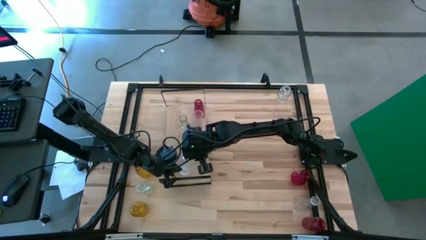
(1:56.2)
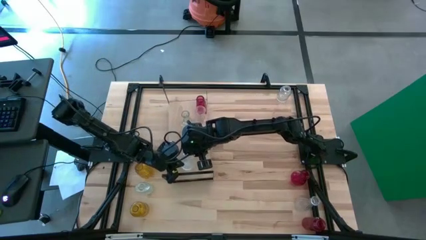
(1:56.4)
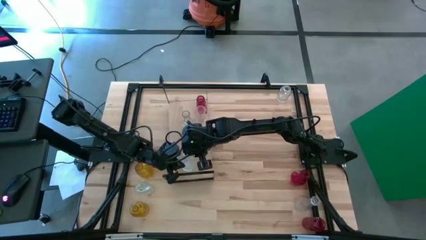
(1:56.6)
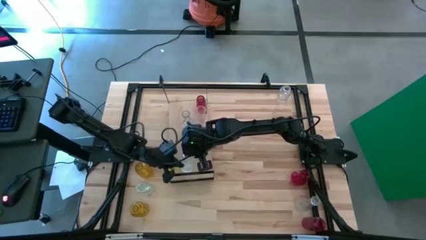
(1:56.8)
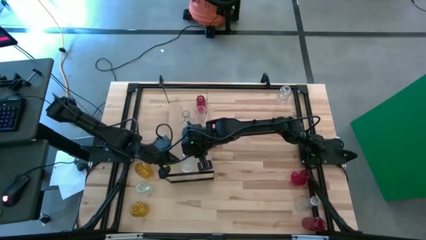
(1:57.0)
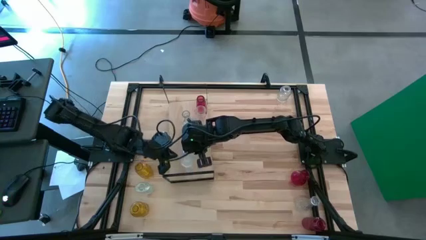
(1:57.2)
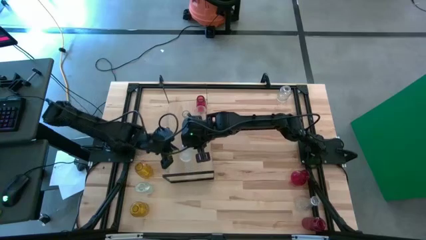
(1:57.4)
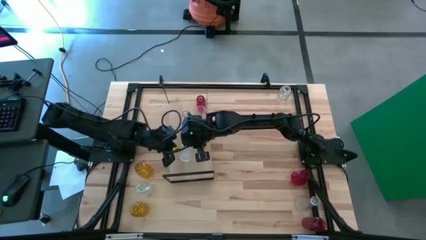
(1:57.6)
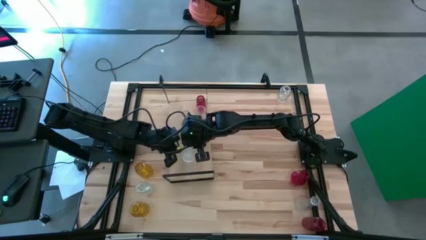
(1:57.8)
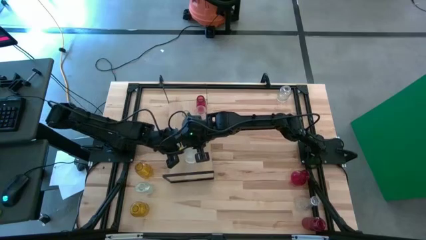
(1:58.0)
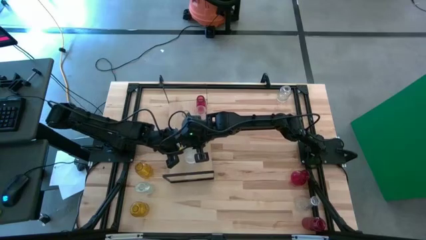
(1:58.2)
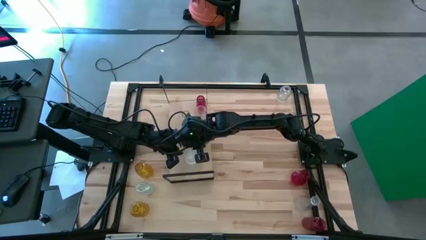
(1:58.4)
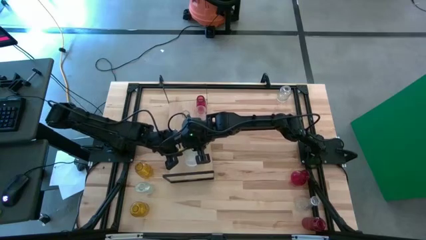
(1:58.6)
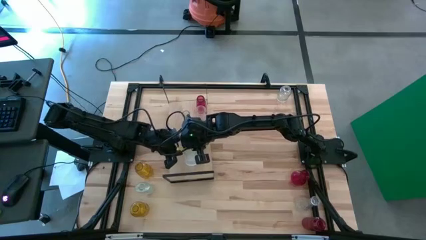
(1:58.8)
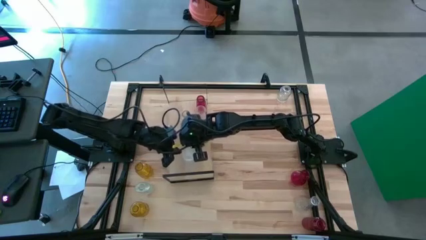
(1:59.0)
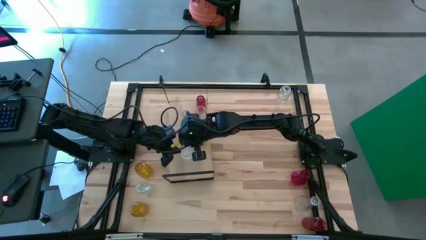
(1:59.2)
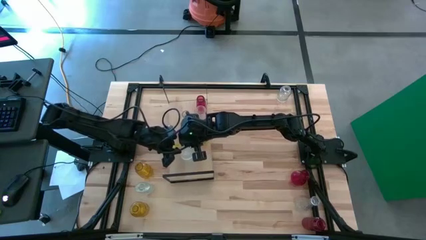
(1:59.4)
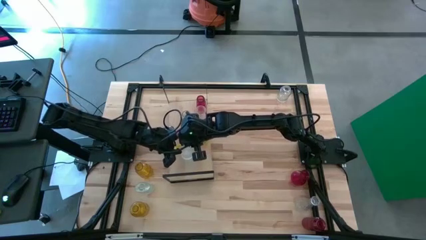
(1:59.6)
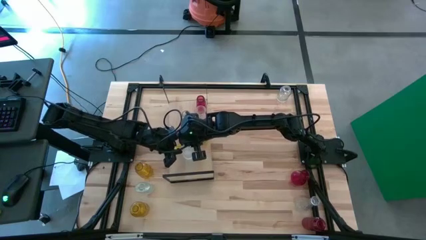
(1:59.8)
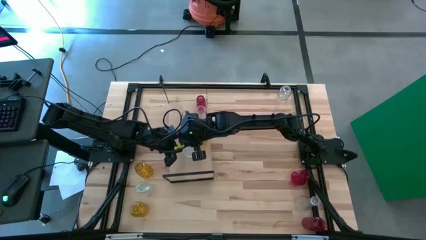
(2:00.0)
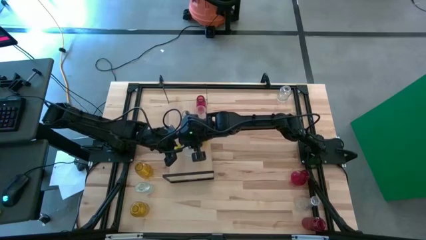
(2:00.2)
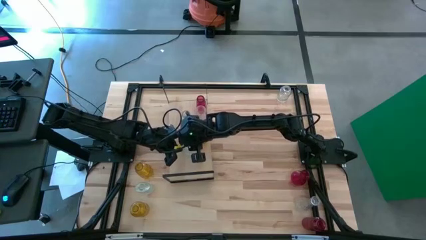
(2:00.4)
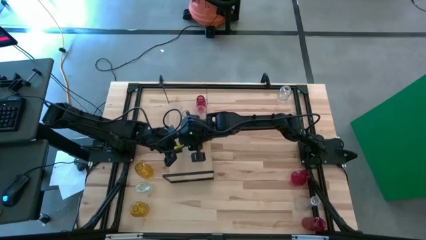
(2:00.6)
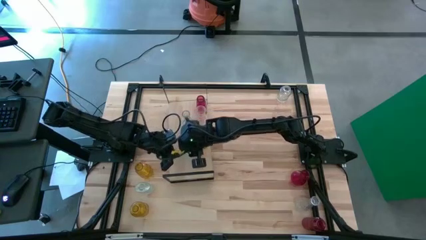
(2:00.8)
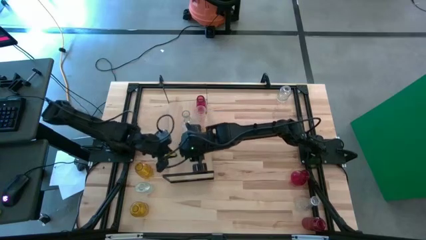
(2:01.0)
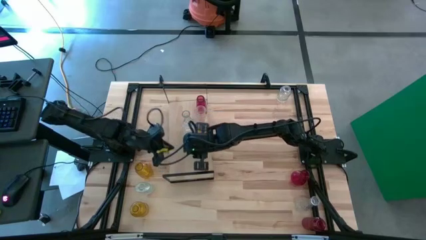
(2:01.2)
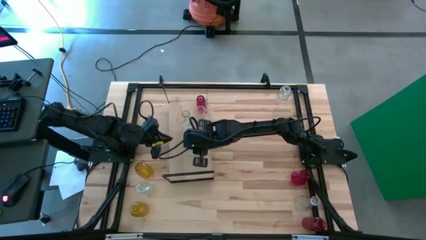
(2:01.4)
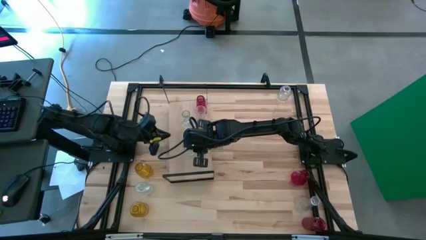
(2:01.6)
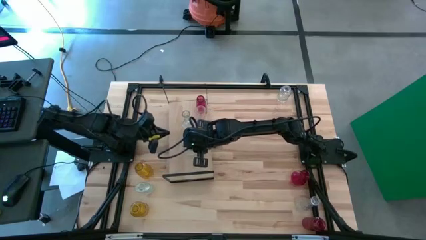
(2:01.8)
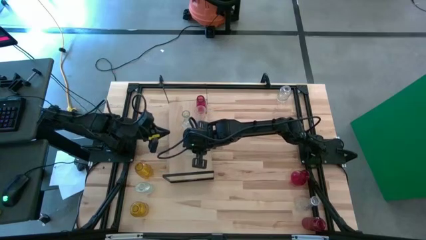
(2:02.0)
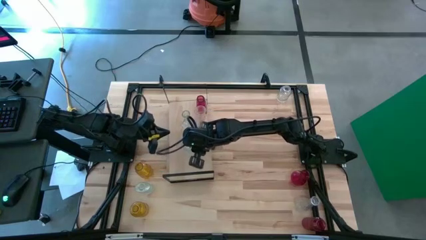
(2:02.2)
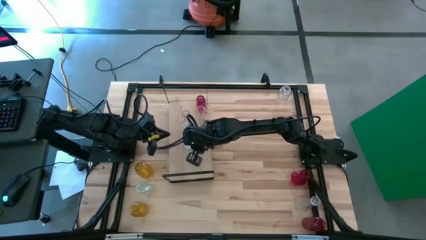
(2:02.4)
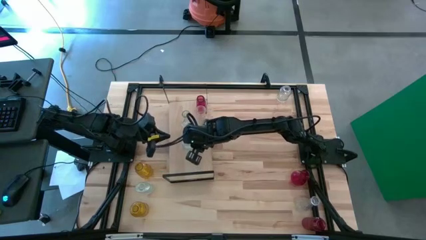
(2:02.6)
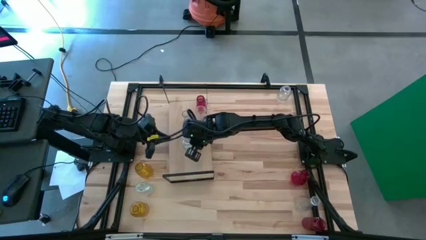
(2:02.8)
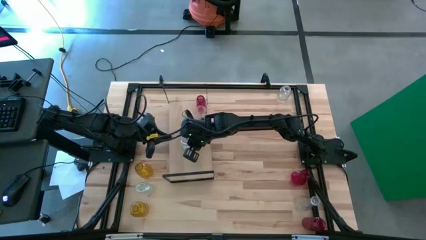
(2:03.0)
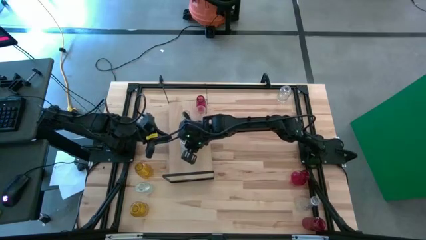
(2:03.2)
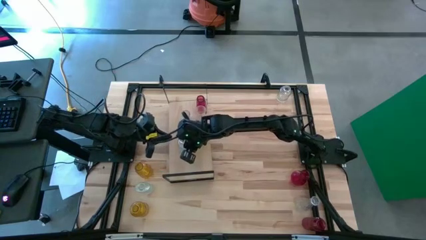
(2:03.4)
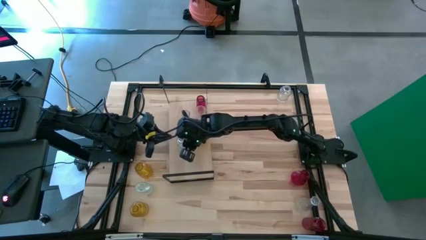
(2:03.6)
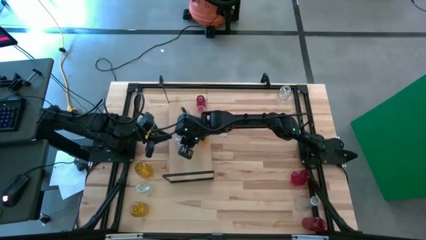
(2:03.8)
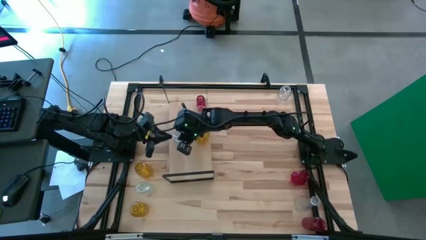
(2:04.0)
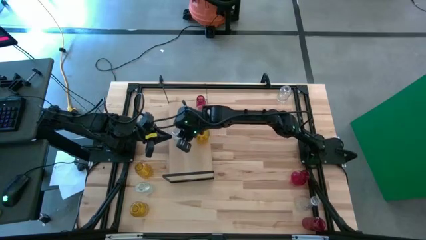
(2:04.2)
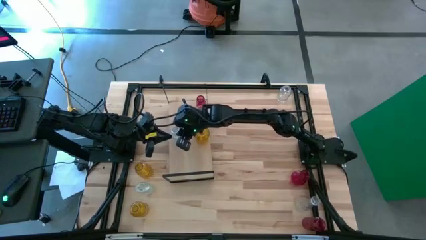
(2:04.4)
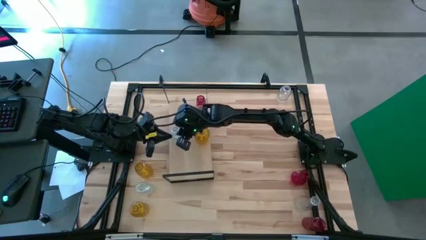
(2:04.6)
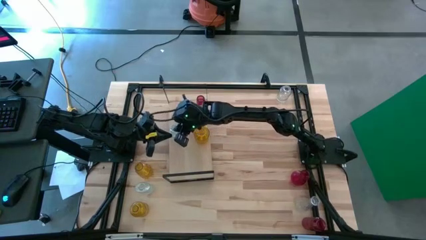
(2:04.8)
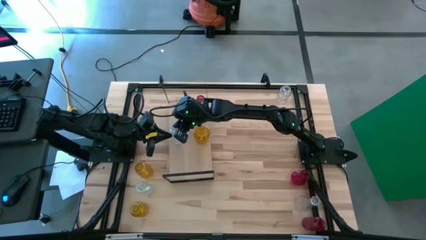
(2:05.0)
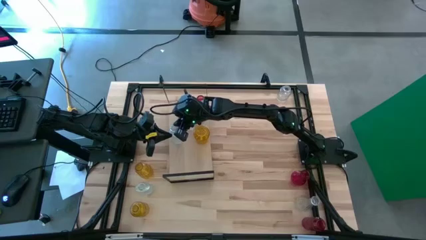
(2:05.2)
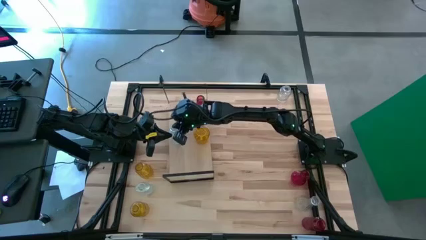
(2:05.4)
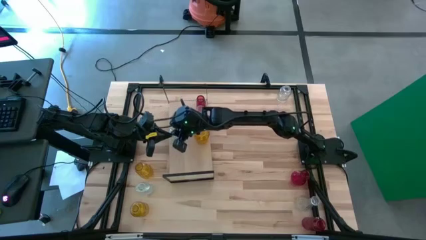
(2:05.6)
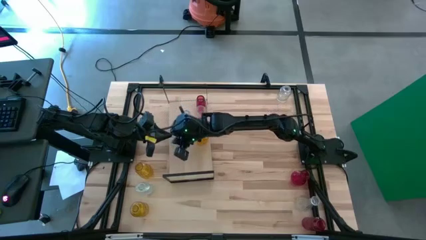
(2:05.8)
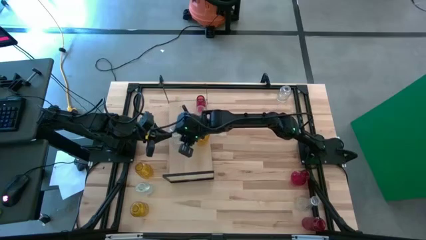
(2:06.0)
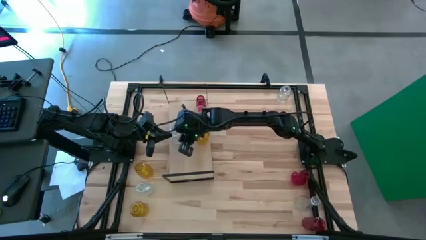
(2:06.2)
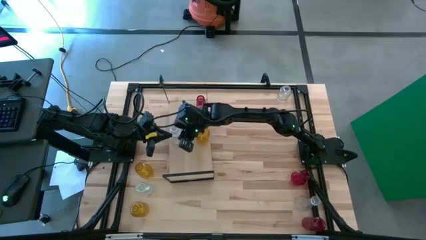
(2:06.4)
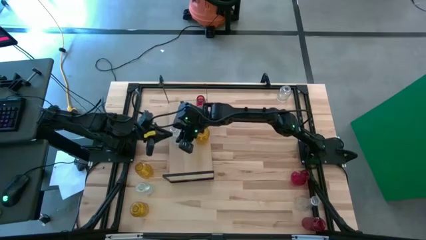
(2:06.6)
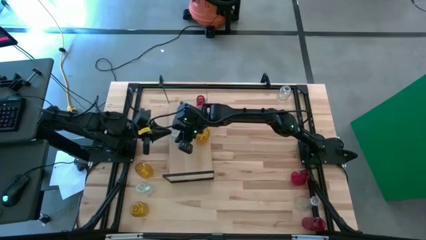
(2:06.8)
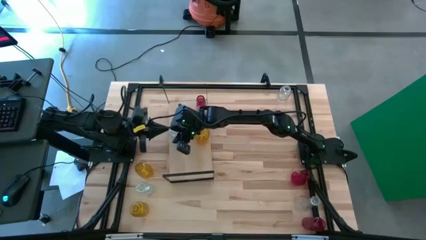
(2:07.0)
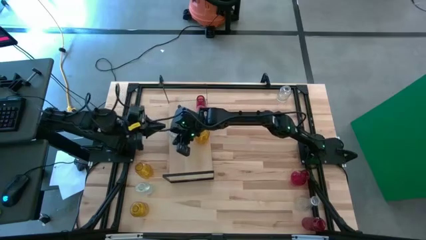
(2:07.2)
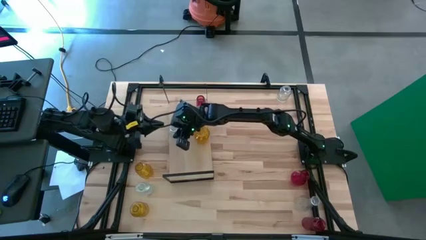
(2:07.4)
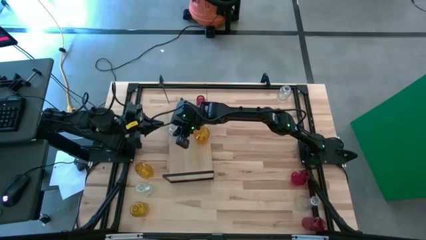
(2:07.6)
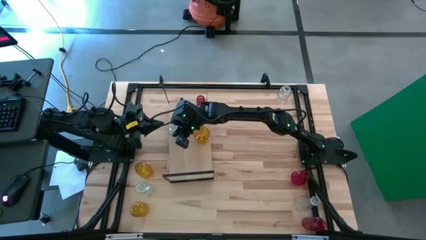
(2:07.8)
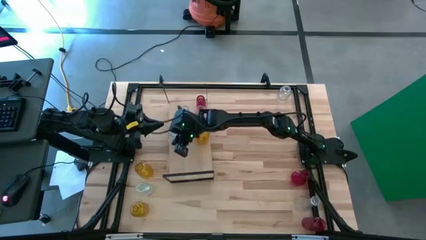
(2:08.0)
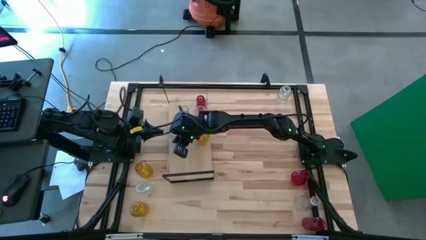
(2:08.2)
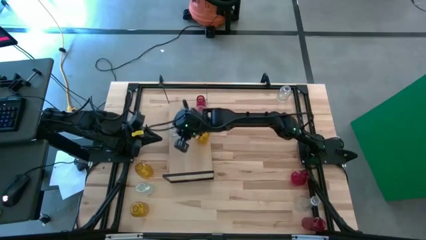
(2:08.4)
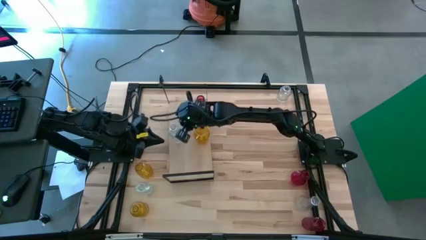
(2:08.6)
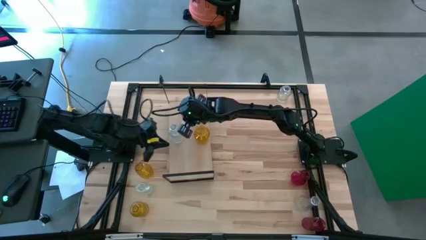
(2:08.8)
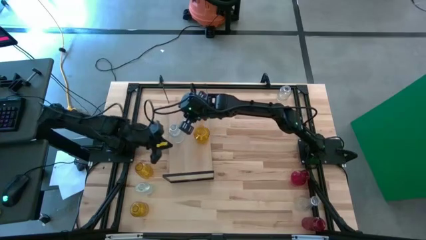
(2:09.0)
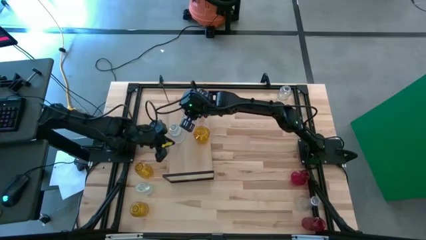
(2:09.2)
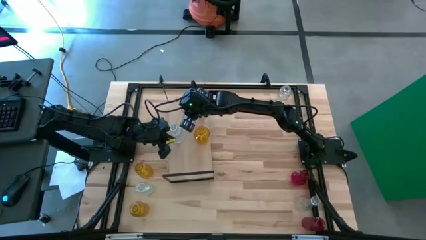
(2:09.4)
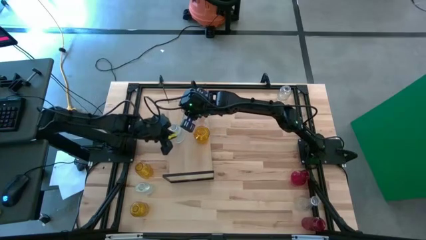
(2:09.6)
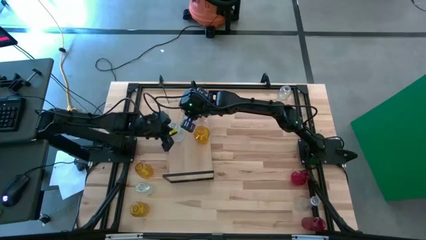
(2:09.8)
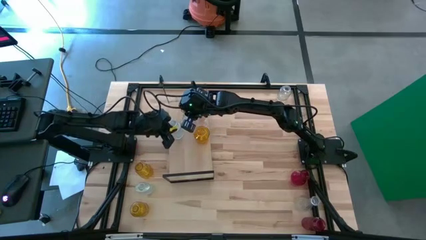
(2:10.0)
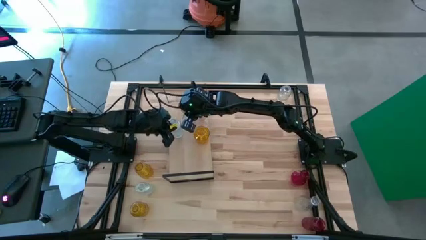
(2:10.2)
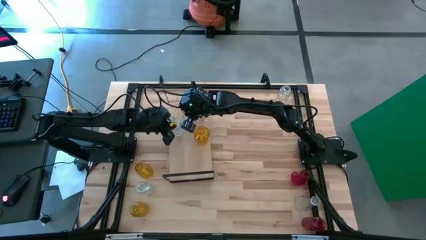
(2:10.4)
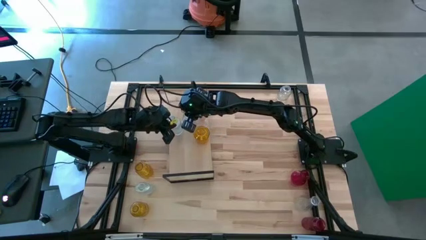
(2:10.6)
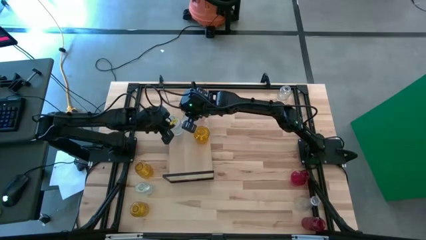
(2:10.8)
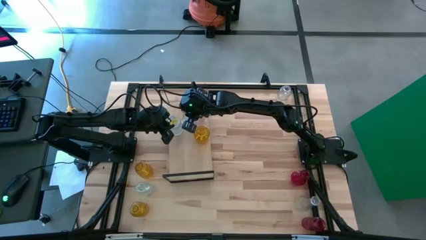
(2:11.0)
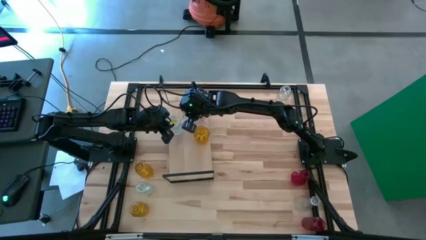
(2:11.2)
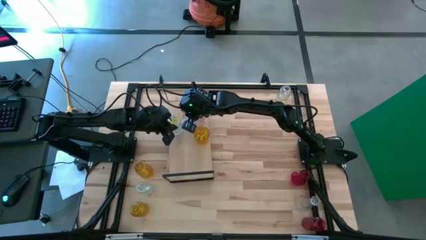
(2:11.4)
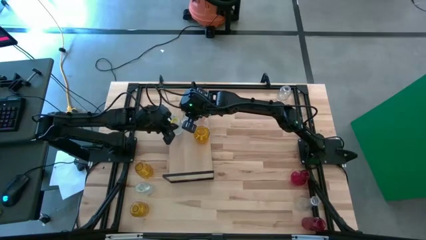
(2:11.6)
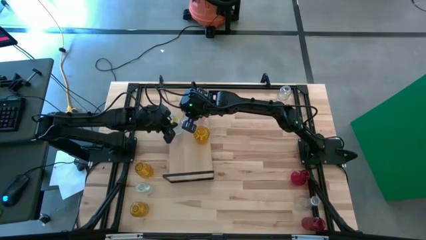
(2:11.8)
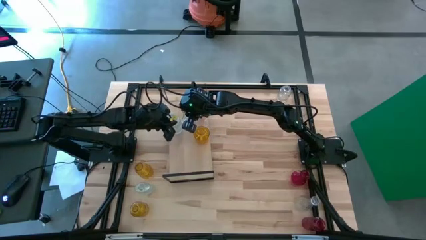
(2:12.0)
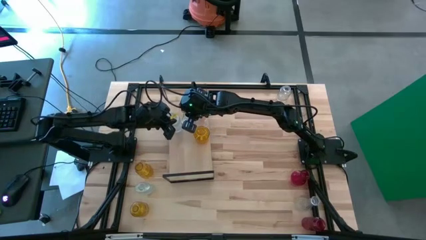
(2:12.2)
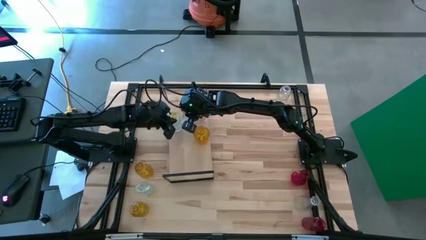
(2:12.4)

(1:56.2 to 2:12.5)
Task: sort vases onto shelf
Put the transparent vase on the shelf aligned with the other transparent vase
